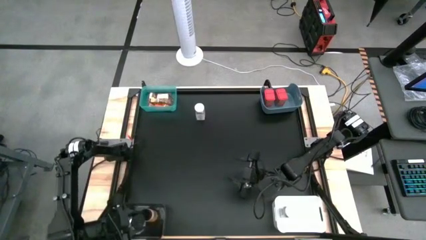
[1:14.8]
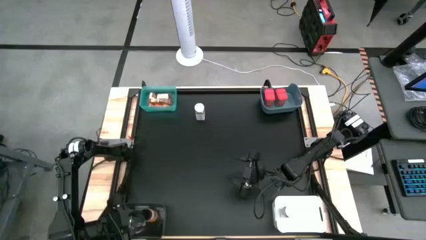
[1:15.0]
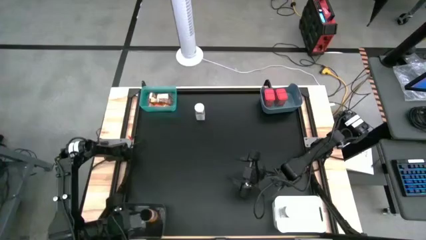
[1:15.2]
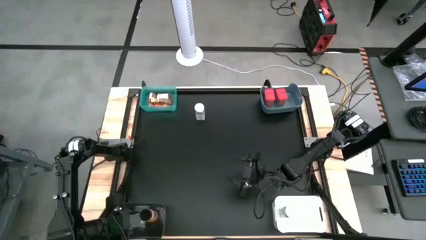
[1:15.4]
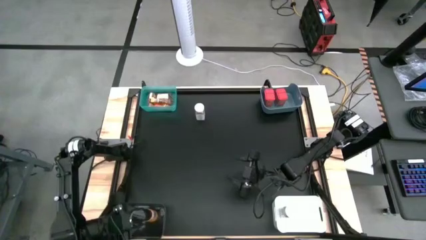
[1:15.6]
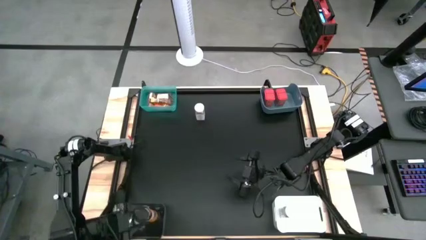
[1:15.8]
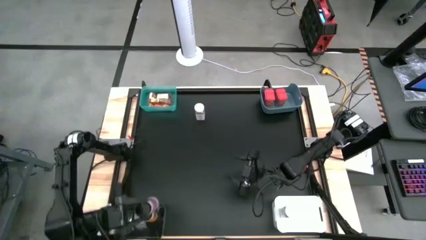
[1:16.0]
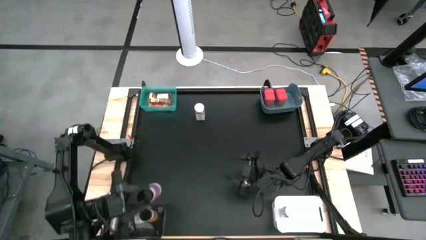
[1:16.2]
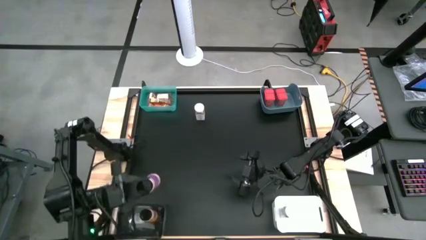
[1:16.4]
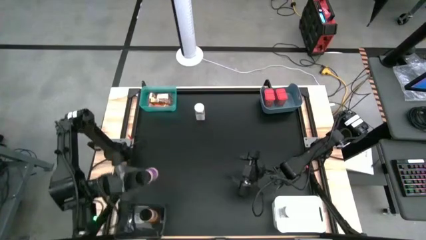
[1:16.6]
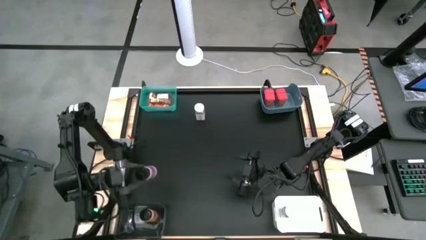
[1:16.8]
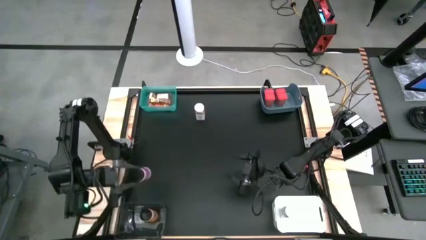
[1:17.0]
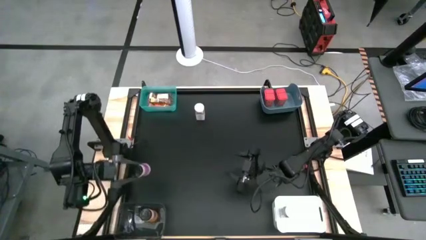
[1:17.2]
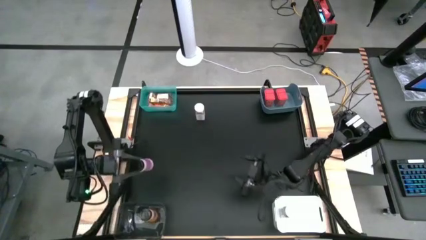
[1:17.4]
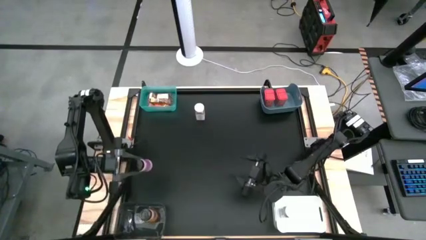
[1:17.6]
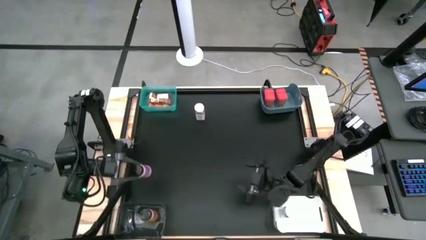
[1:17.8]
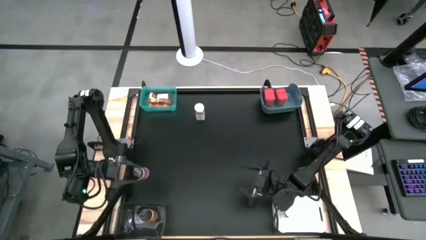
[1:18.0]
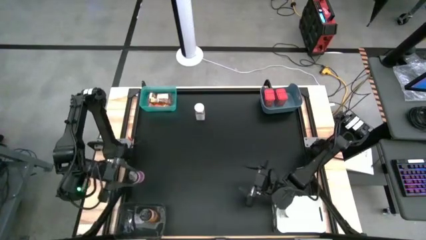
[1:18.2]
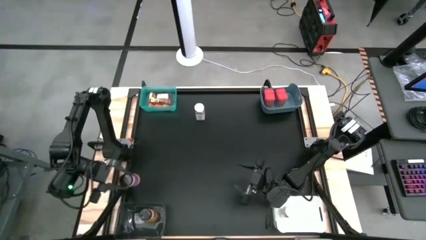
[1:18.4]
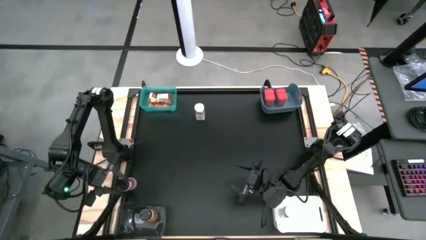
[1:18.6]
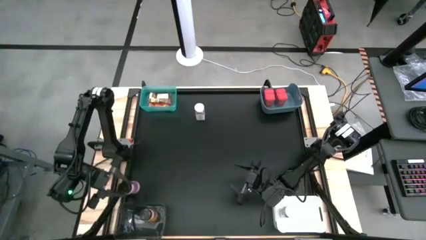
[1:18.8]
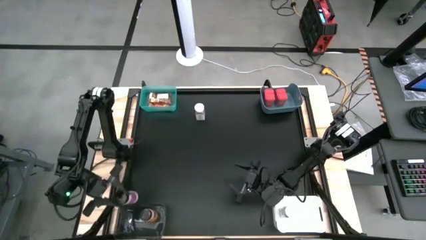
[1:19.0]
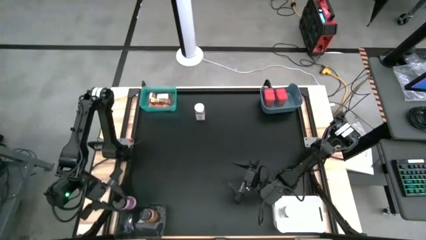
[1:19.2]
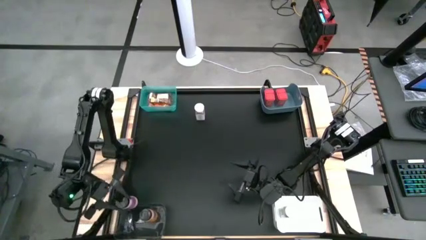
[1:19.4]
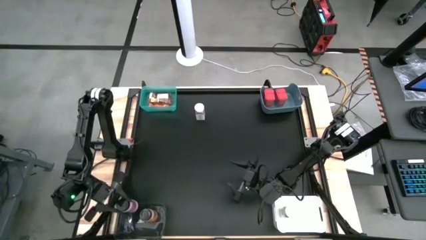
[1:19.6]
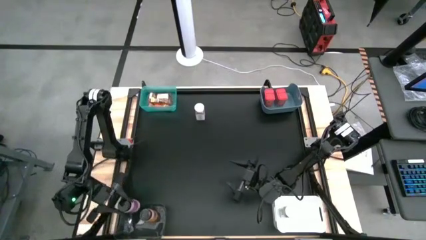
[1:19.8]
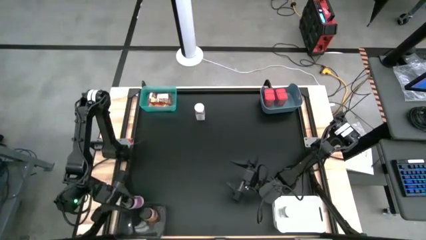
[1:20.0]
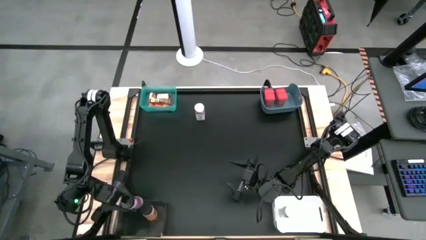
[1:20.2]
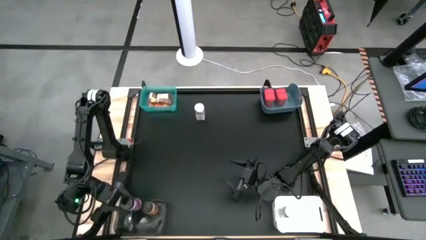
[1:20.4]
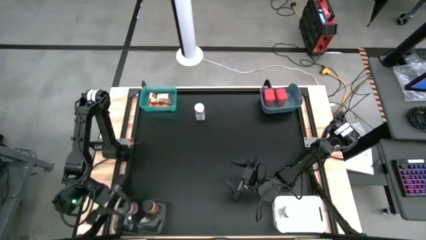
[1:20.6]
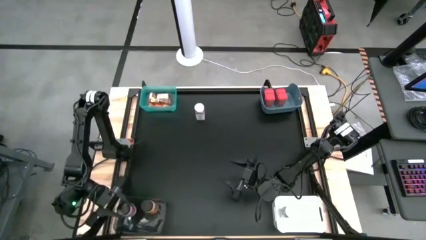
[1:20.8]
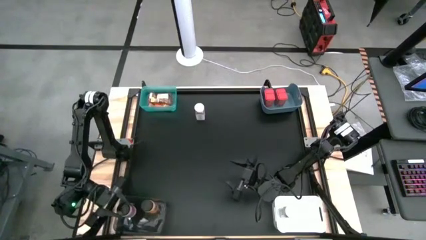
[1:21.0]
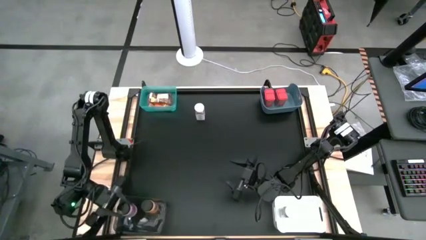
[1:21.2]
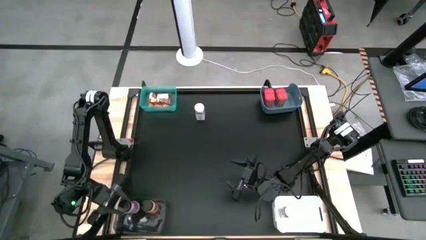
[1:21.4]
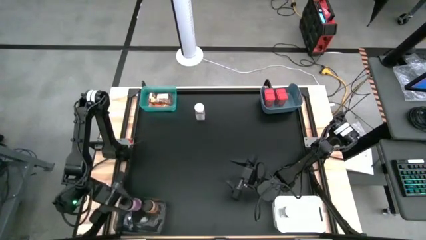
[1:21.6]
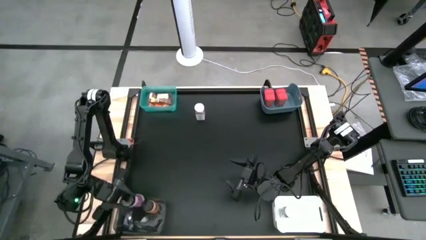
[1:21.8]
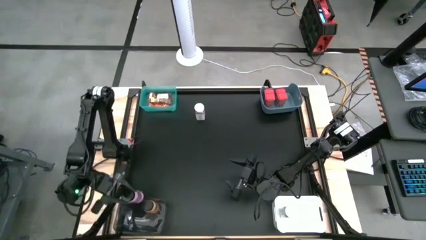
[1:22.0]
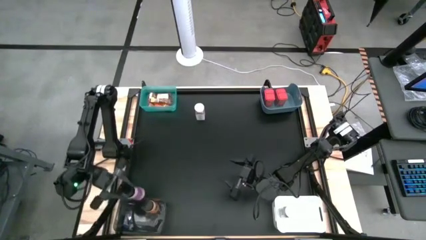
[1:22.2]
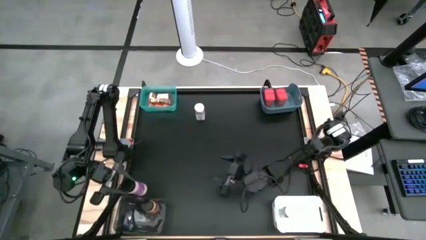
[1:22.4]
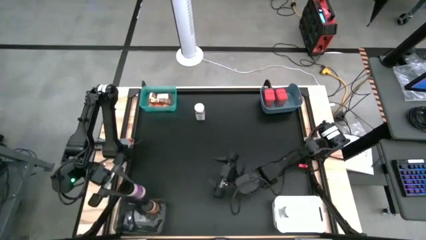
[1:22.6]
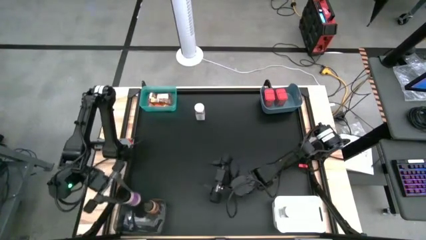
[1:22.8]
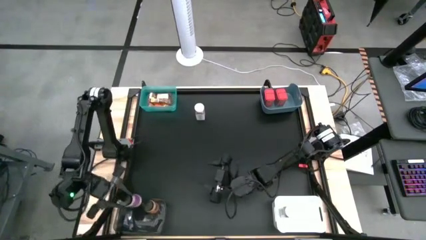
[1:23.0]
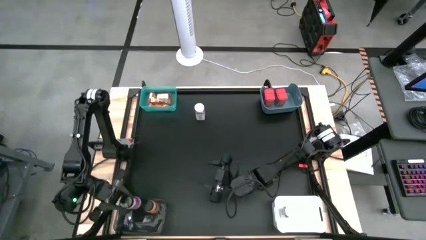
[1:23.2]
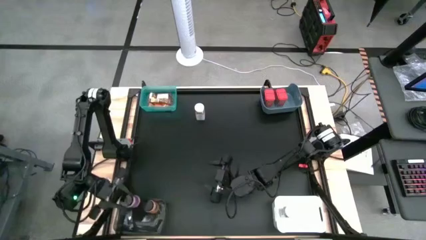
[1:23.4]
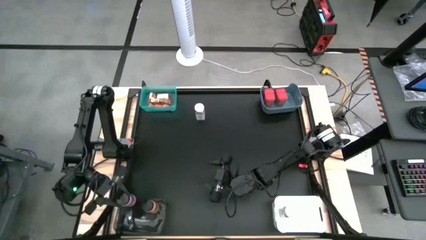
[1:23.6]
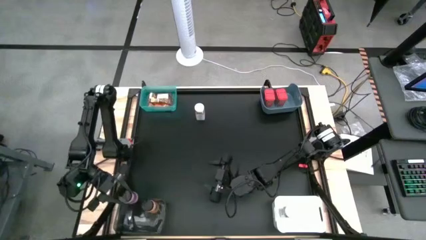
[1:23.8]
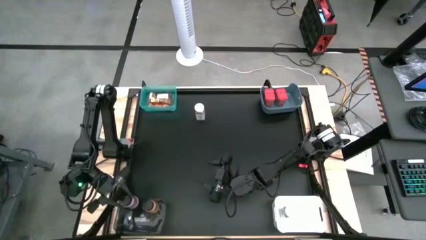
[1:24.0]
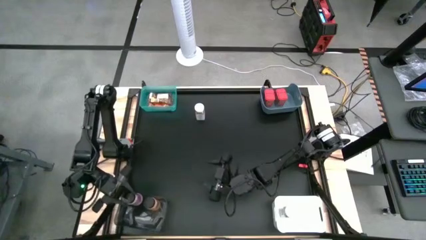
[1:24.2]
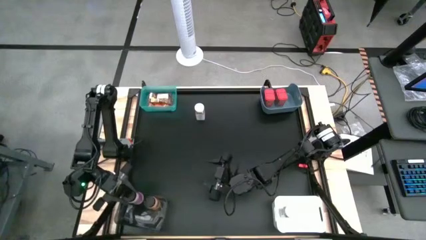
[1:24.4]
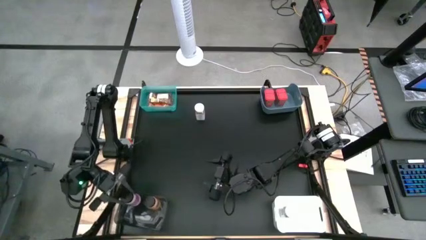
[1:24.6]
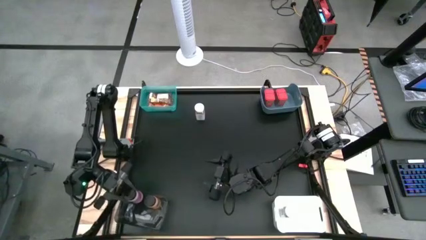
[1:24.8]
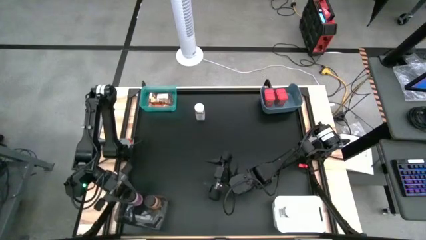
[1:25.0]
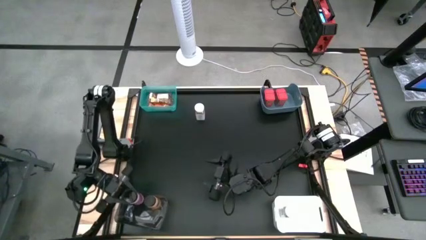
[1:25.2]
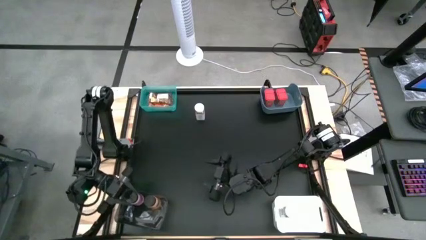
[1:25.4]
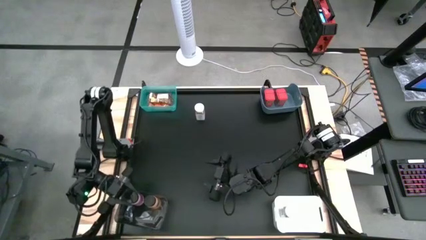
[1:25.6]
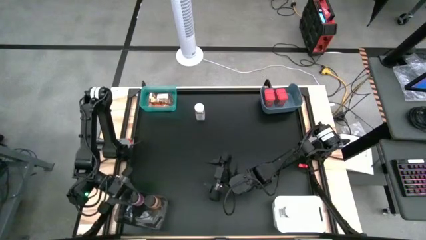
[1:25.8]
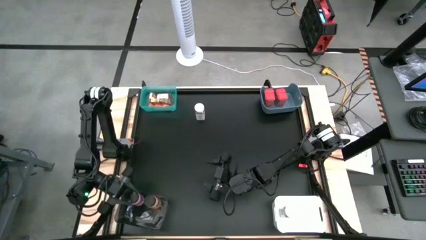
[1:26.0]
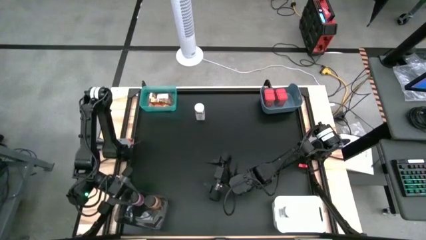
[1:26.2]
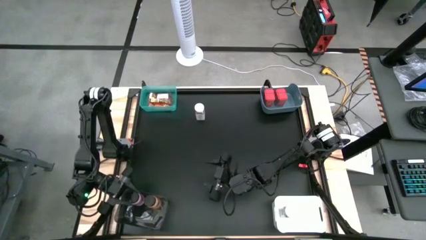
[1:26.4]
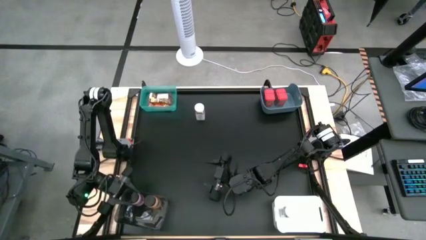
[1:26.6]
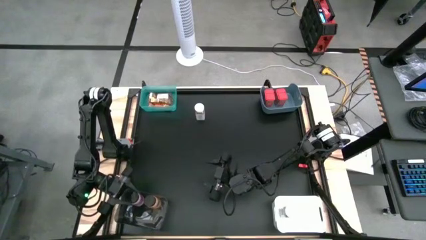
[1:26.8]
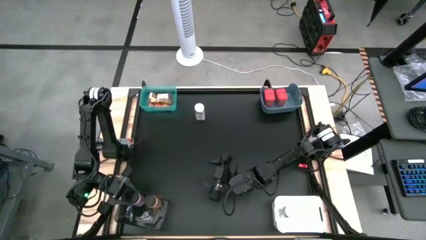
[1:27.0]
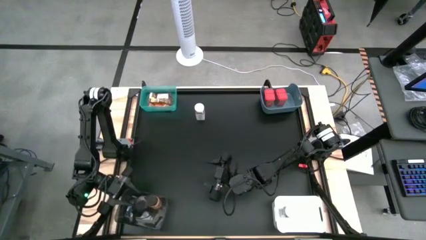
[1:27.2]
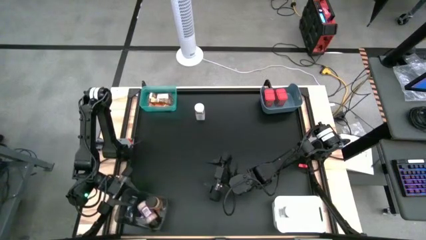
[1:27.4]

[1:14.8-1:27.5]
Task: Sort spices by type
Put the black seasoning bottle into the black bin
